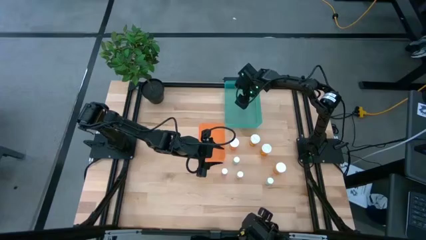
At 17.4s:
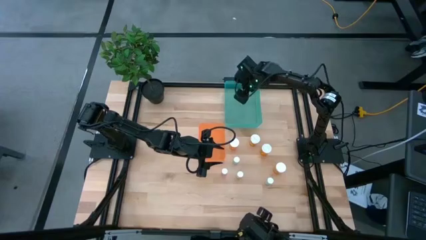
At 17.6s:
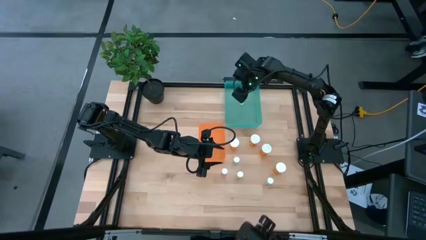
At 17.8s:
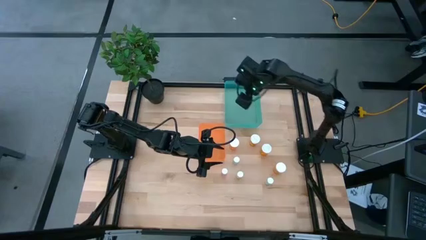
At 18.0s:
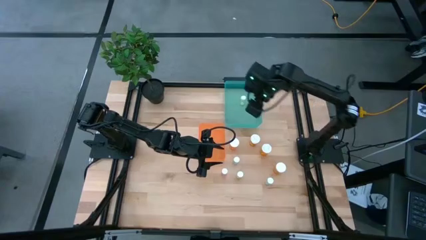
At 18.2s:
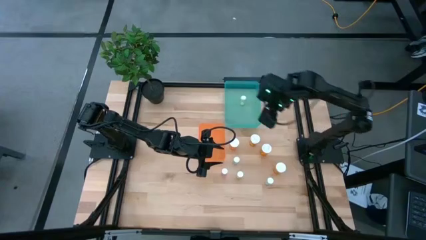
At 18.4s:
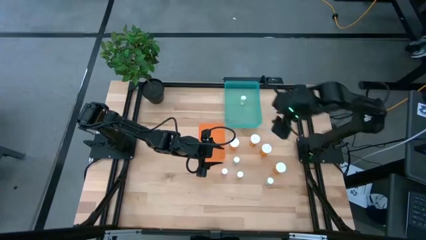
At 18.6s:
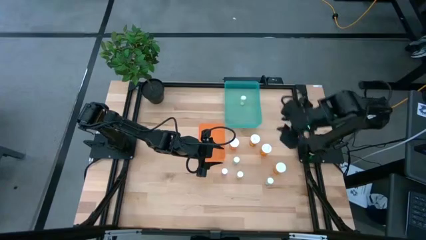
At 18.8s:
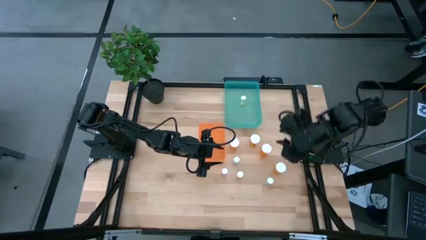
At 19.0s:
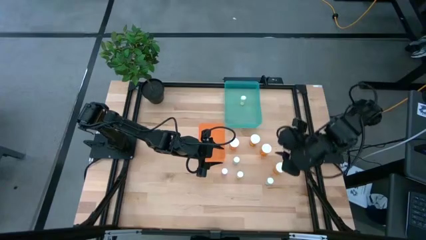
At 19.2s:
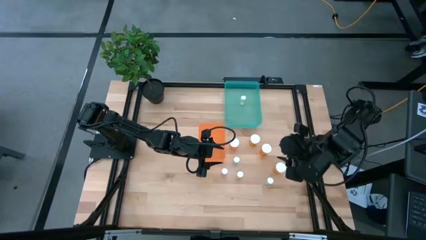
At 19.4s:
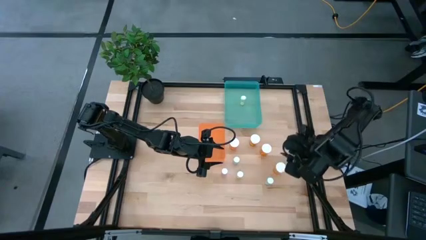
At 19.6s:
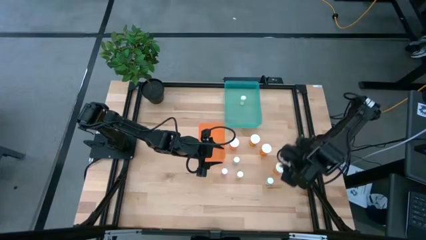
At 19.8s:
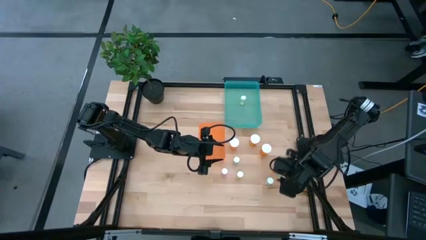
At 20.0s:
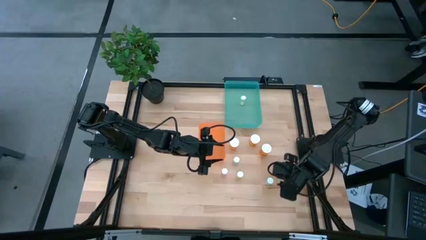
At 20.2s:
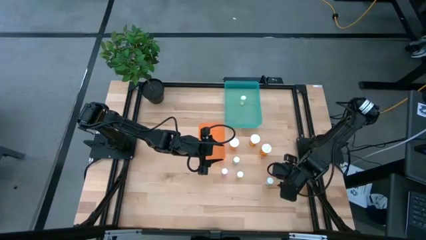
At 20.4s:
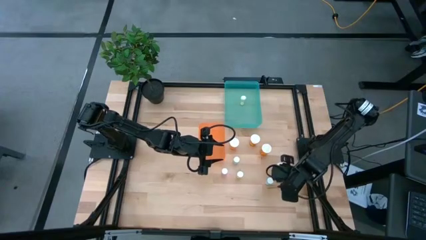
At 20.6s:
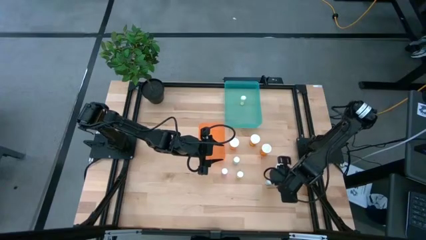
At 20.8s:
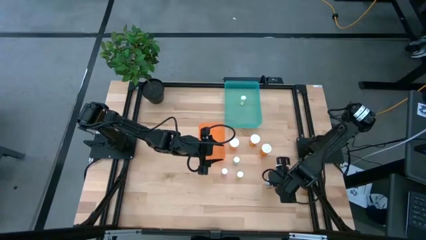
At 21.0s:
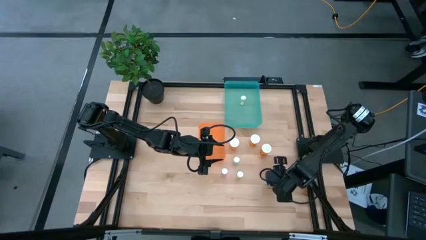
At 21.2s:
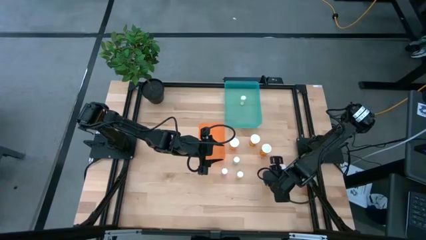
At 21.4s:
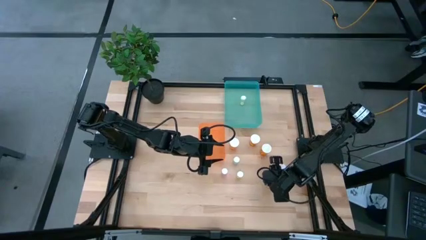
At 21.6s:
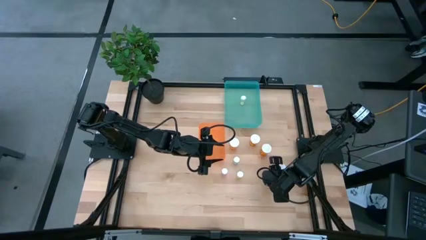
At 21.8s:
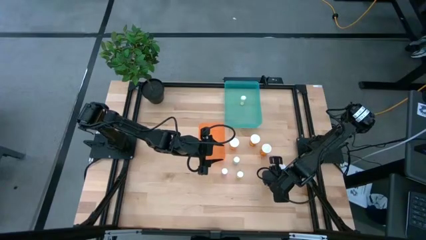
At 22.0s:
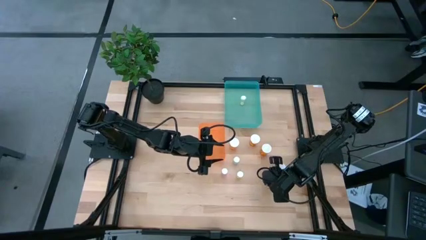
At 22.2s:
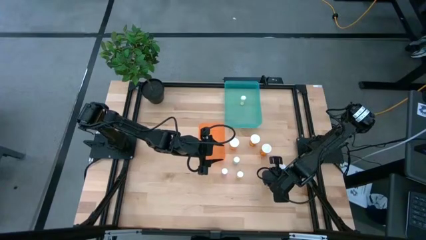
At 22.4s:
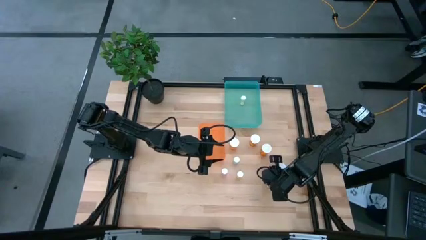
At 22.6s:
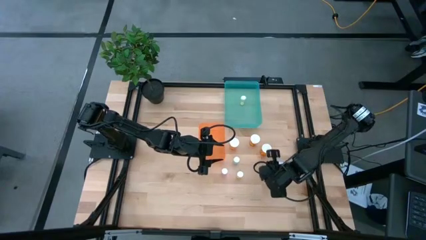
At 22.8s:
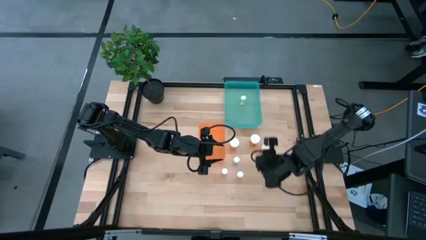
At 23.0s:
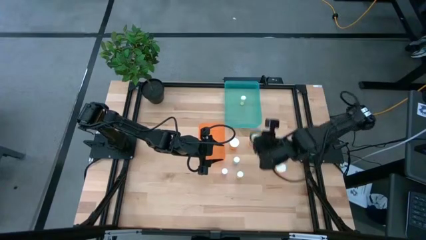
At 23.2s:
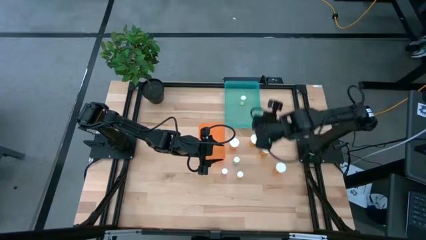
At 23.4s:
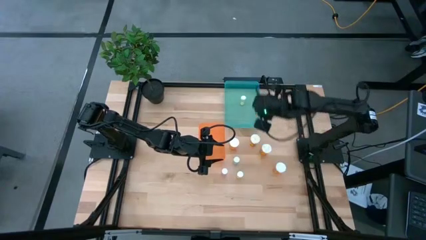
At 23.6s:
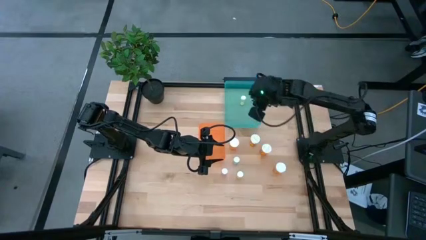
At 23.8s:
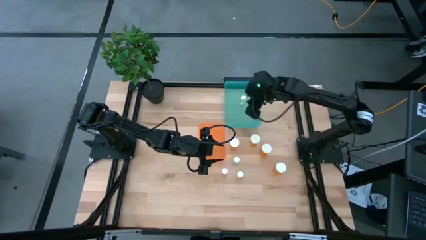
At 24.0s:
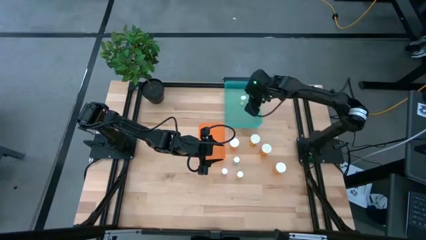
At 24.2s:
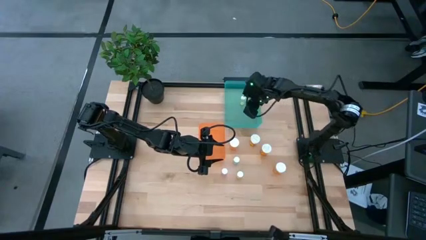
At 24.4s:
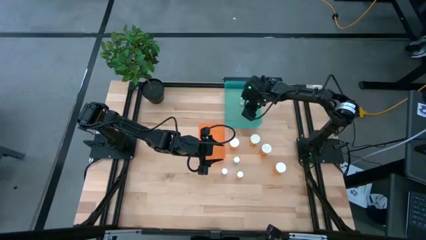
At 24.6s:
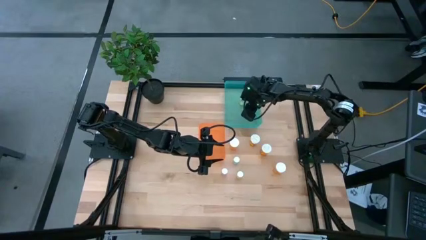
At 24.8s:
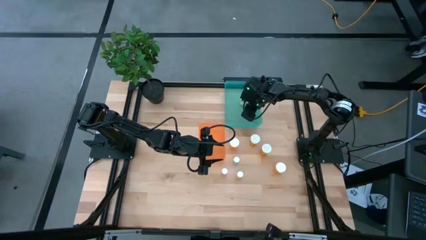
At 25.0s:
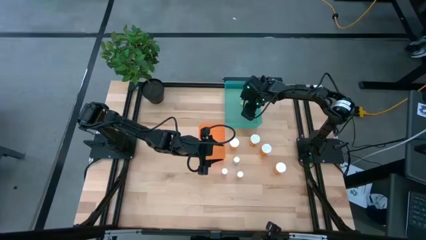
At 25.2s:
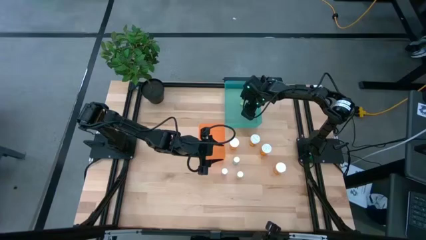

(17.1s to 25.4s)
Task: Pick and place medicine bottles into bin by pill shape (circle, oval)
Put the bottom blue tablet bottle into the green bin

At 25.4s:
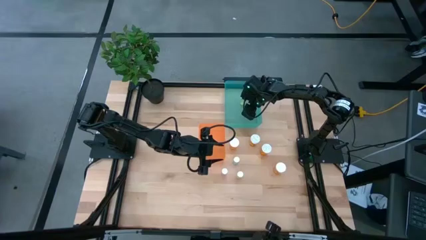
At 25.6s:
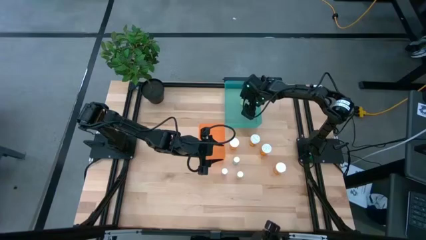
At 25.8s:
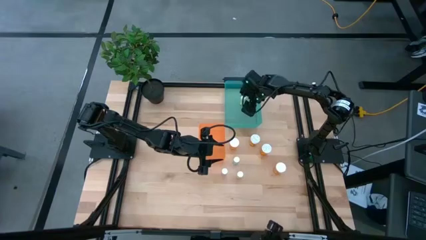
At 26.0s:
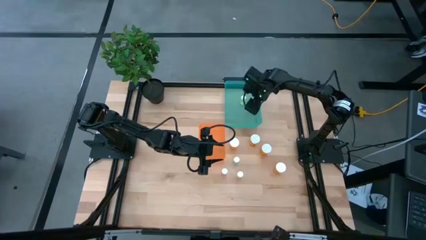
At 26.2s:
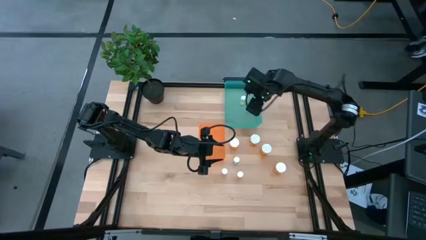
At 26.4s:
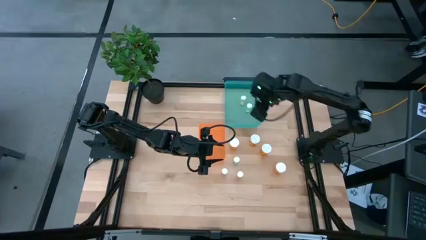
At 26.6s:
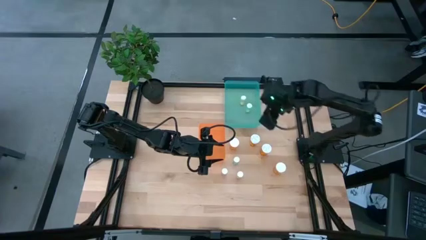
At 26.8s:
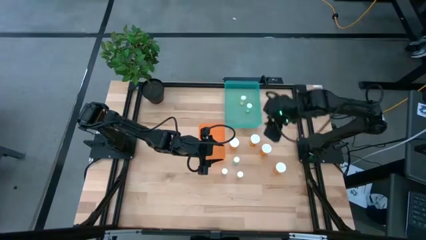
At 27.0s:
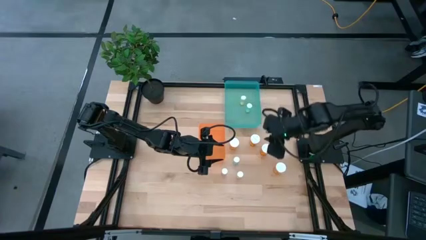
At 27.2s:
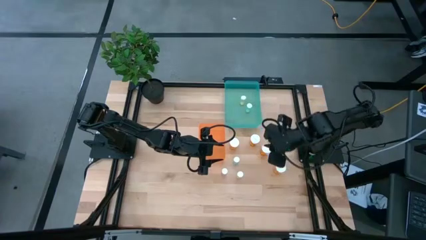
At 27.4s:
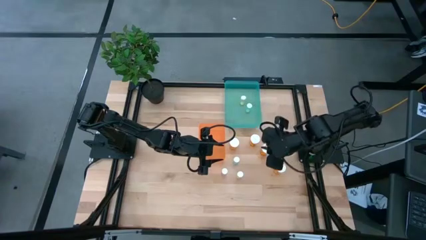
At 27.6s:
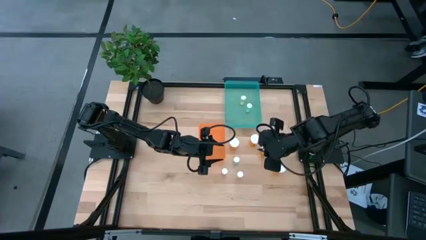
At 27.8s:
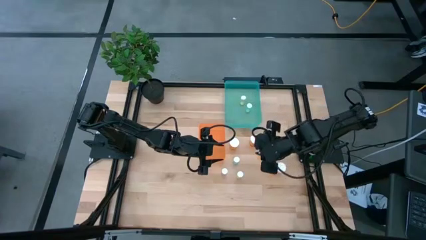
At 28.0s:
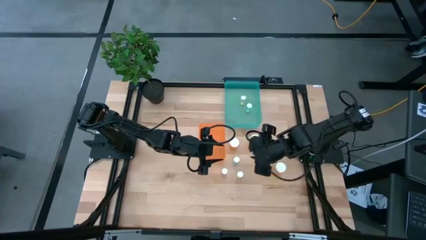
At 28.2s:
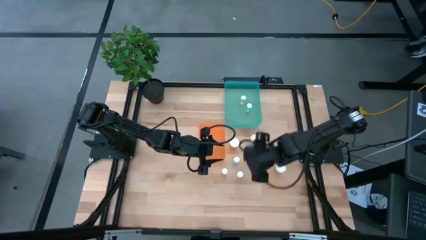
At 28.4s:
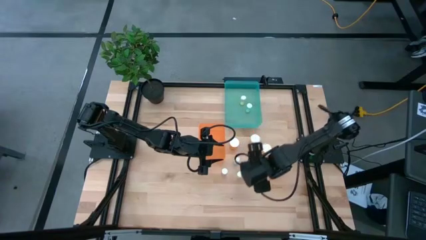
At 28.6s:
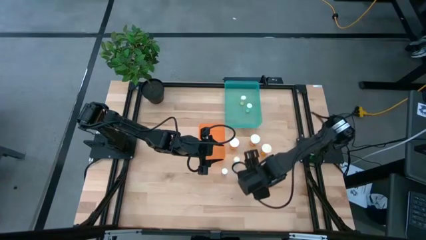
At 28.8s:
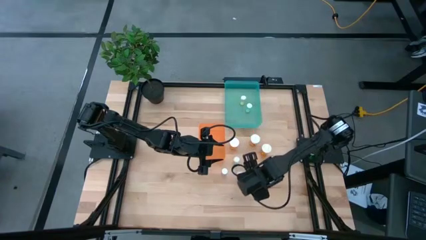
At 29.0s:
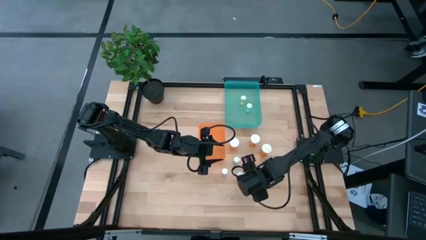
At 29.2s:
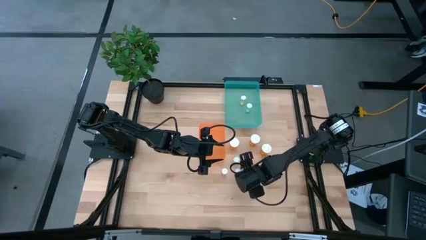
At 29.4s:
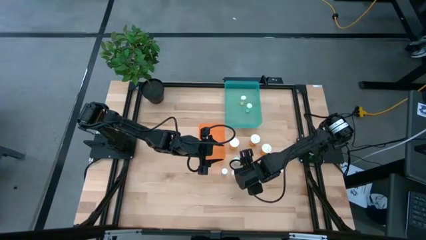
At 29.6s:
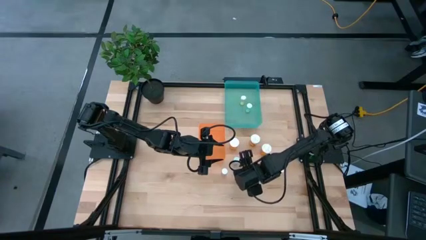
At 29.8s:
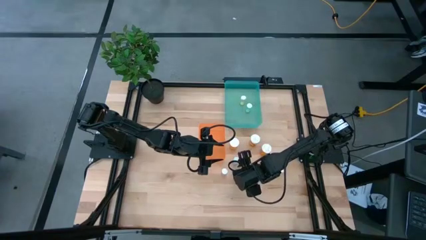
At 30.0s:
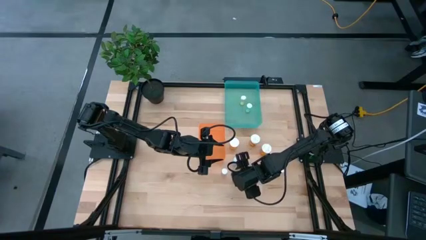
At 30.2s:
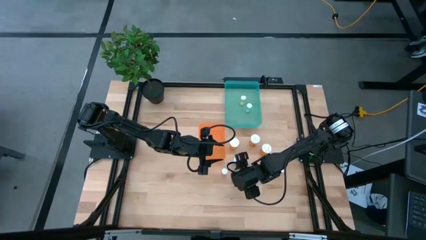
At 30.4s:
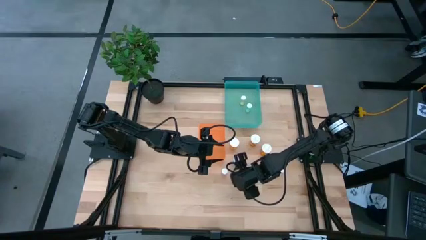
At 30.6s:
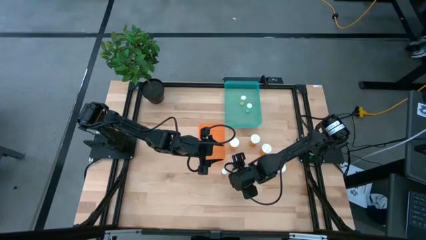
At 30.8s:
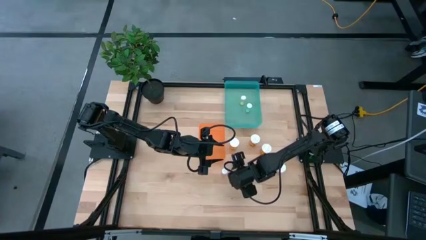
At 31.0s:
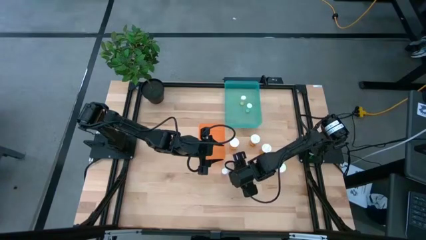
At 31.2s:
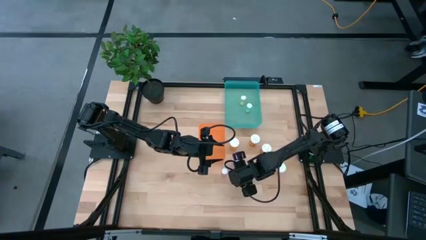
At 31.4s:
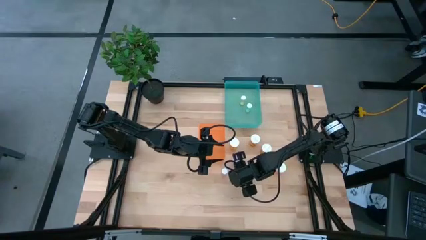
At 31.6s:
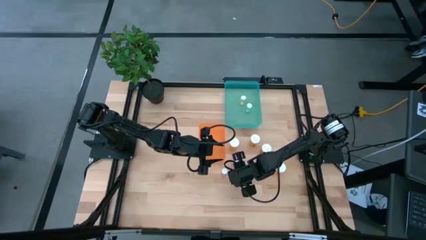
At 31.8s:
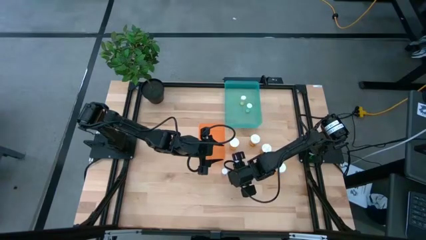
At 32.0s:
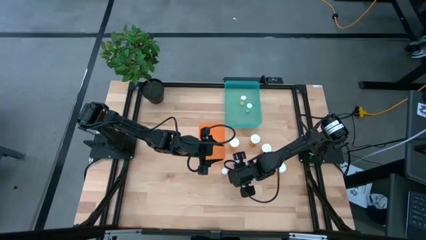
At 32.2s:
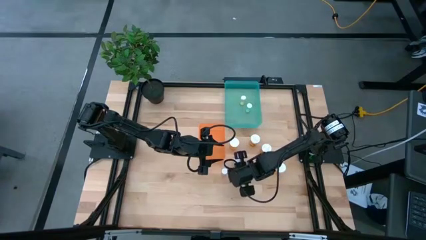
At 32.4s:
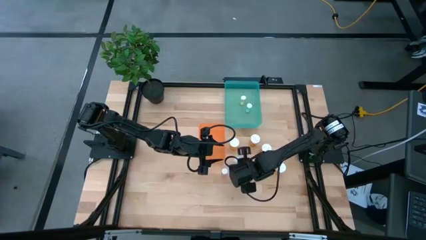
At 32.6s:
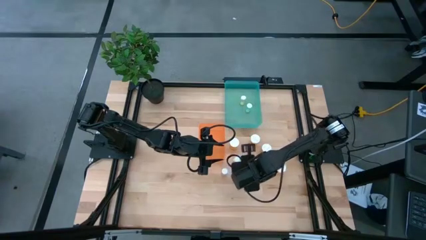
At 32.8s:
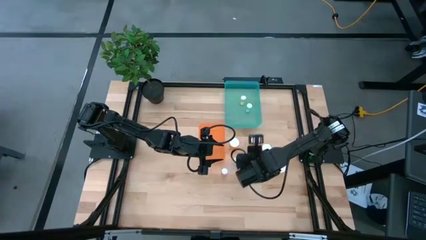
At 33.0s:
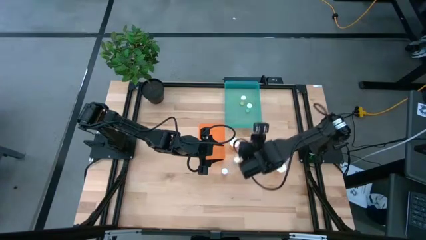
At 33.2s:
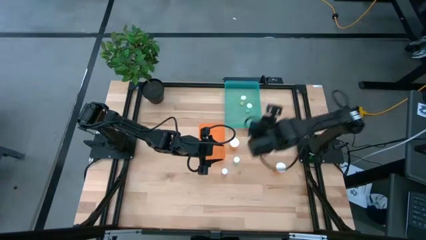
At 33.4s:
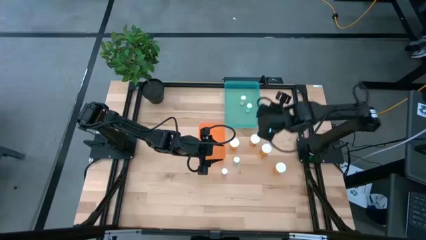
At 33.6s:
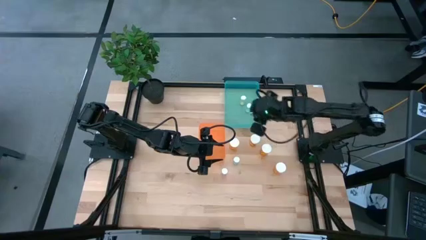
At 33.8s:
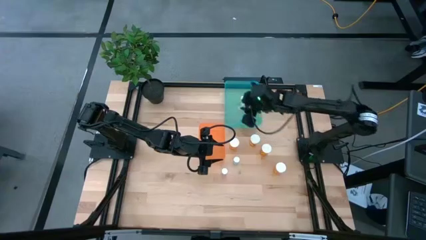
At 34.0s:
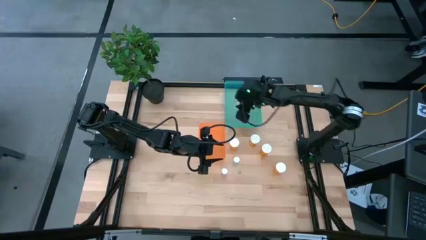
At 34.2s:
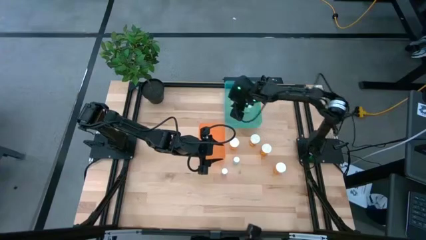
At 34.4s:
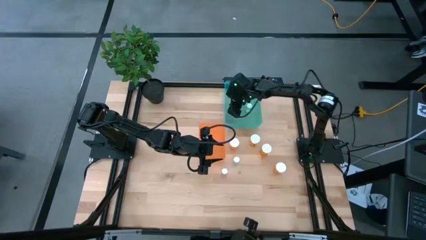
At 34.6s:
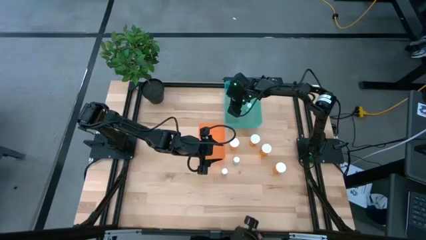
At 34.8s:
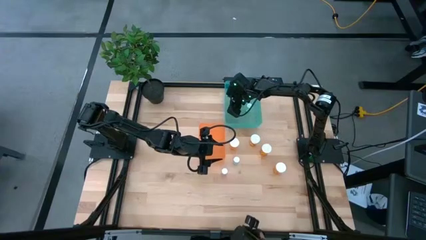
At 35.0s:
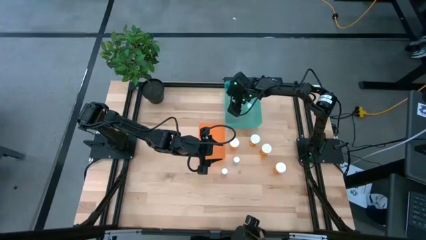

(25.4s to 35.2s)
Put the yellow tablet bottle into the green bin
